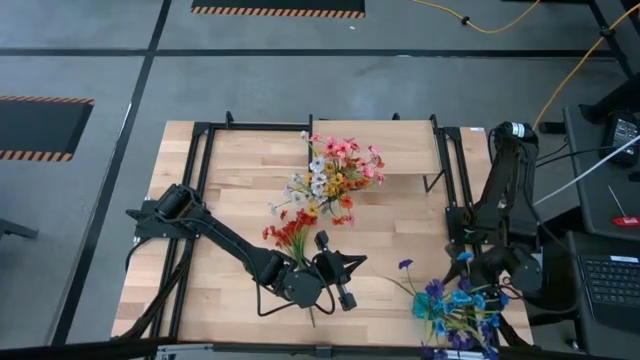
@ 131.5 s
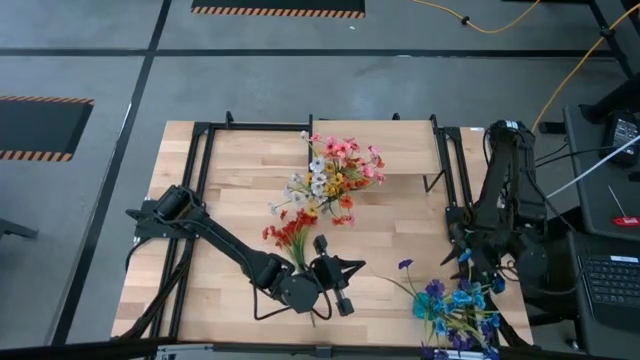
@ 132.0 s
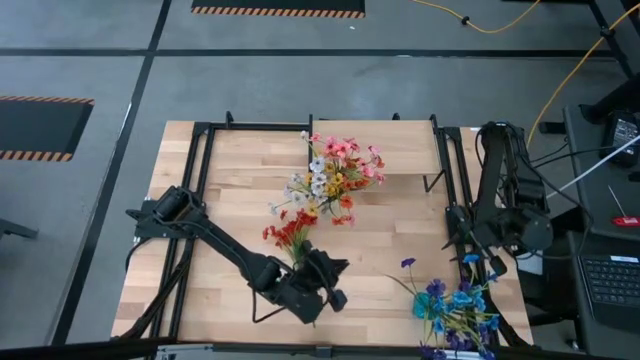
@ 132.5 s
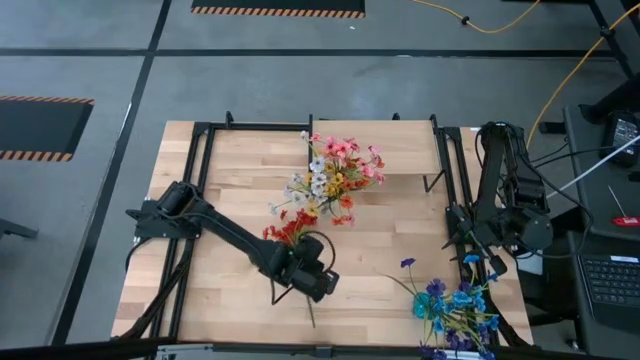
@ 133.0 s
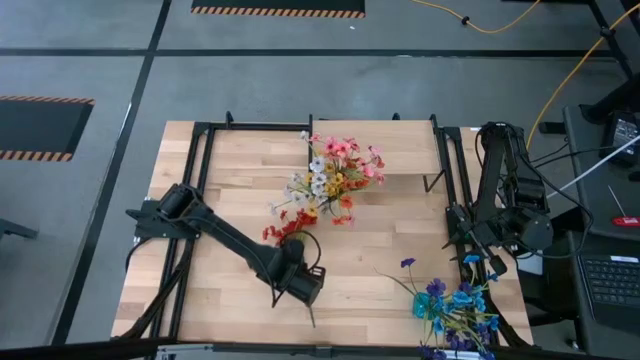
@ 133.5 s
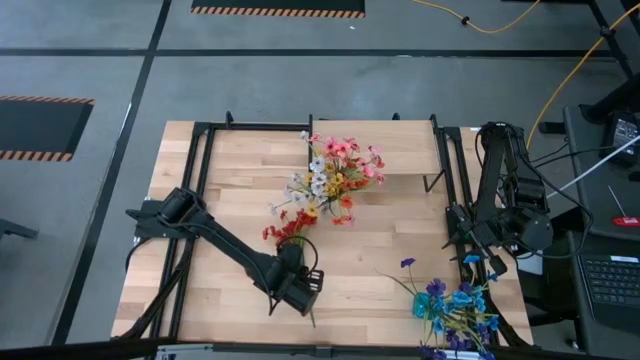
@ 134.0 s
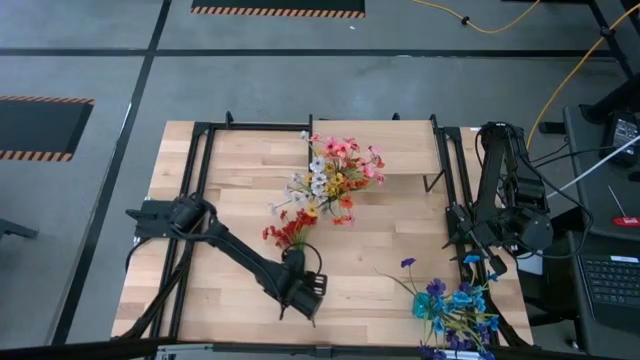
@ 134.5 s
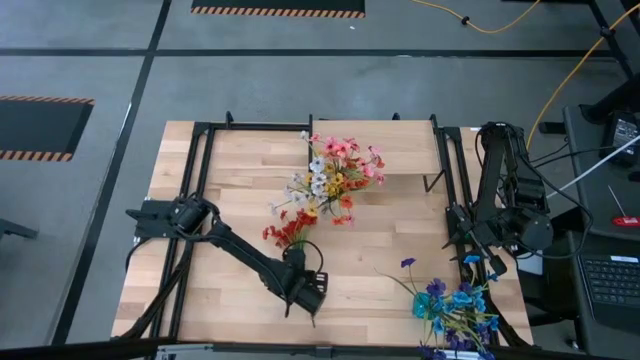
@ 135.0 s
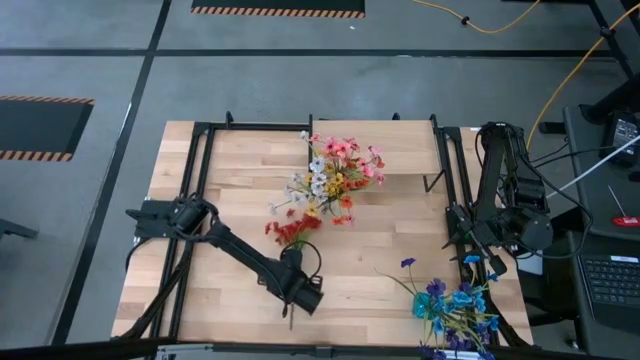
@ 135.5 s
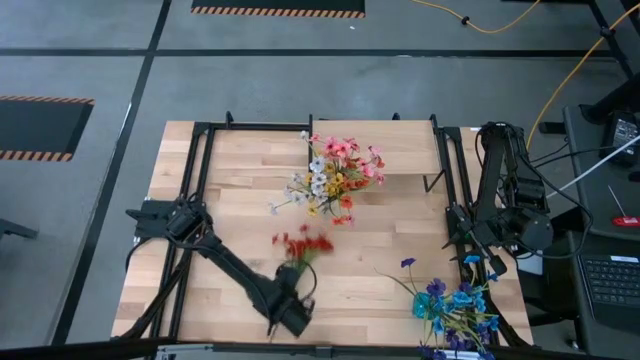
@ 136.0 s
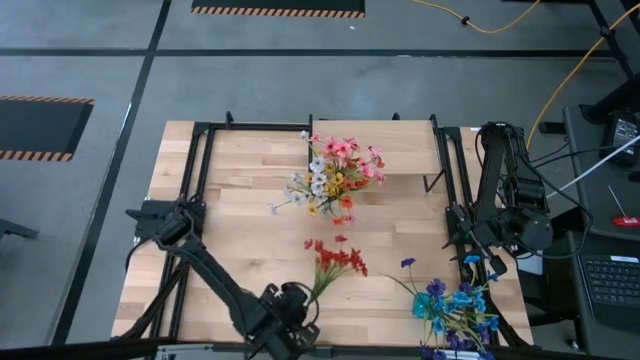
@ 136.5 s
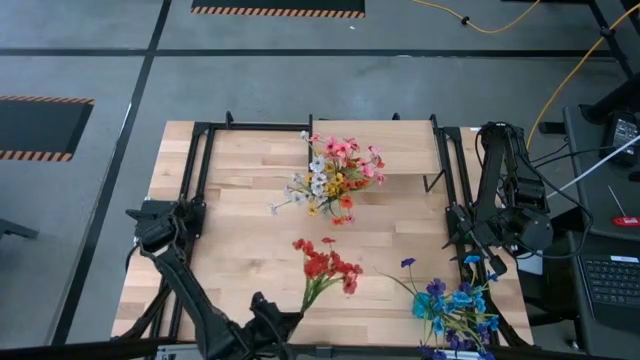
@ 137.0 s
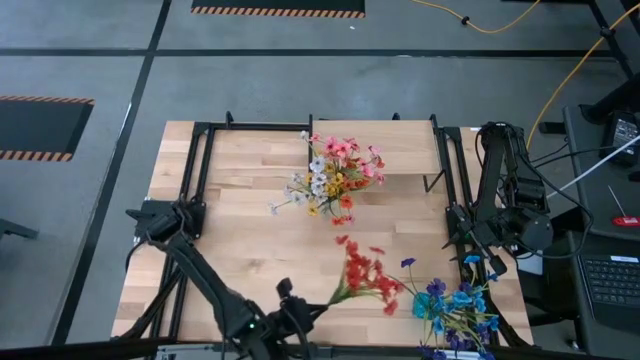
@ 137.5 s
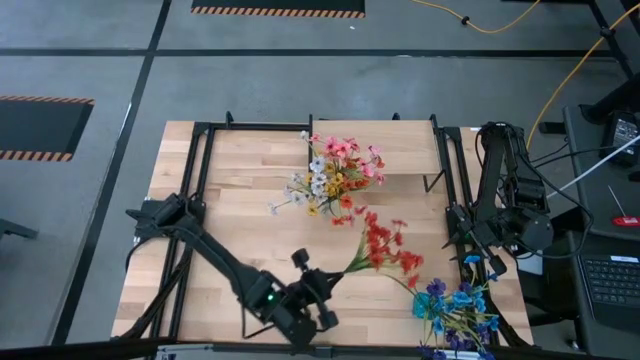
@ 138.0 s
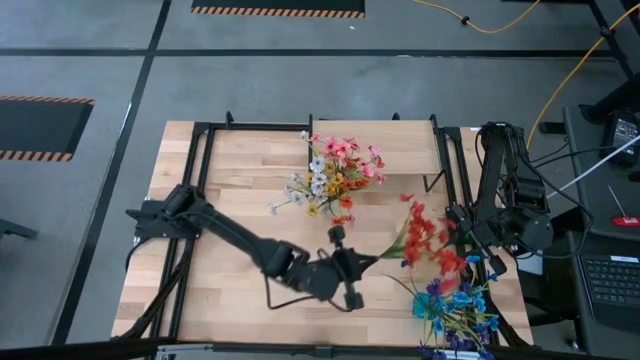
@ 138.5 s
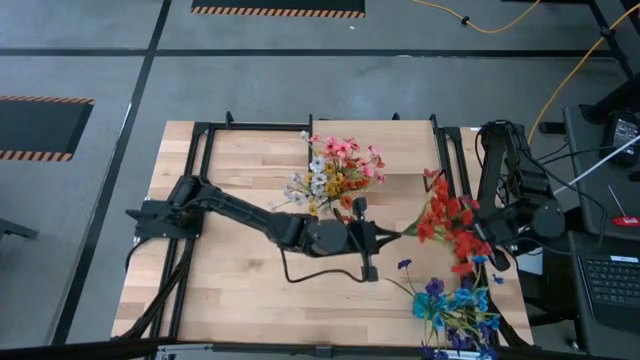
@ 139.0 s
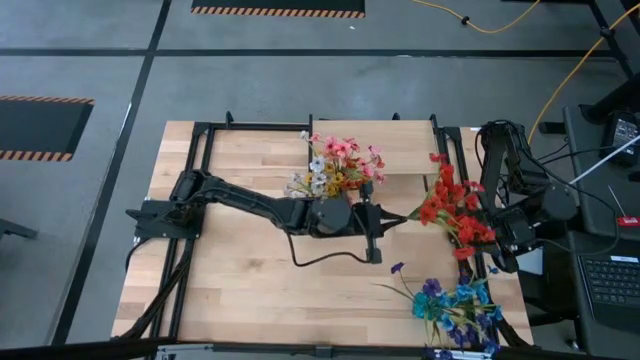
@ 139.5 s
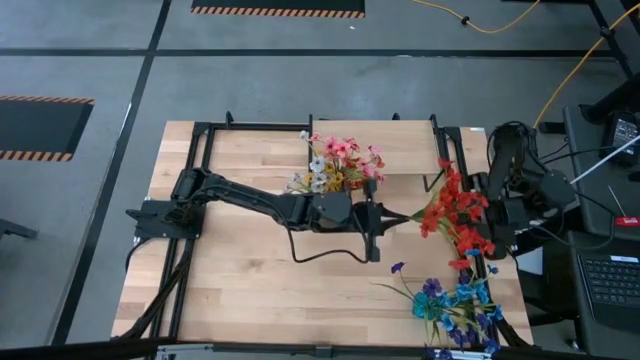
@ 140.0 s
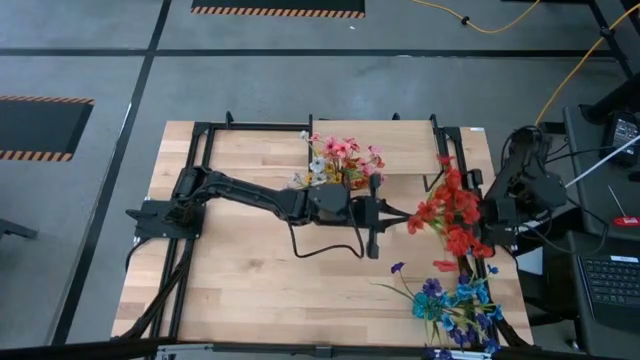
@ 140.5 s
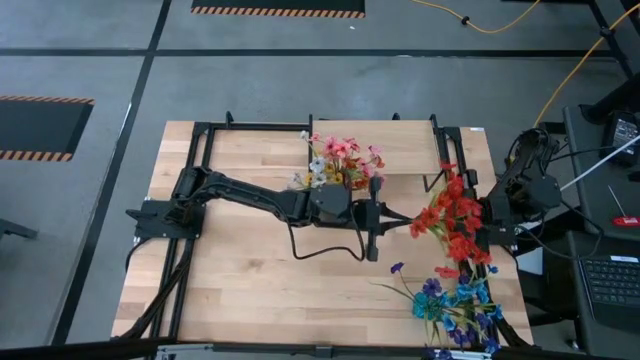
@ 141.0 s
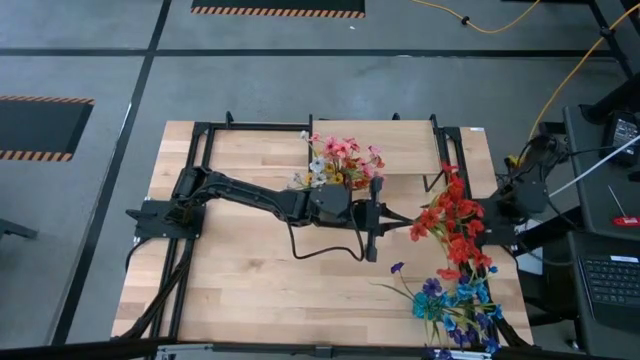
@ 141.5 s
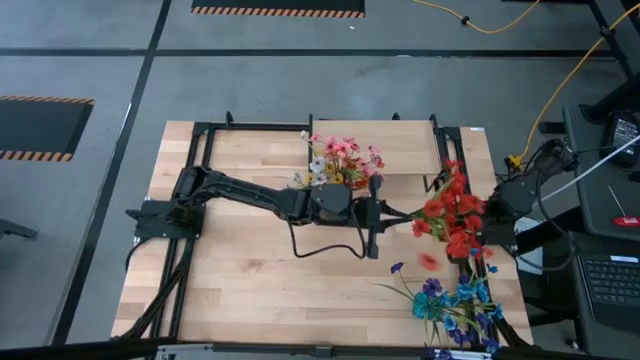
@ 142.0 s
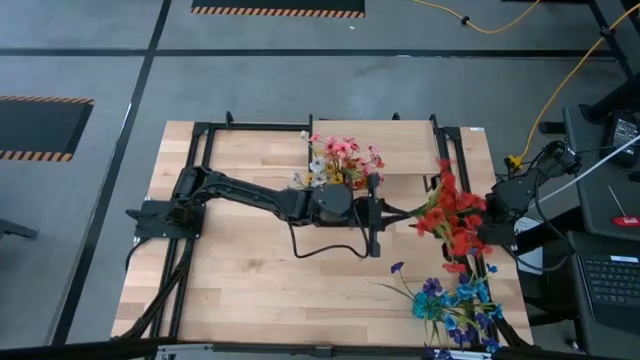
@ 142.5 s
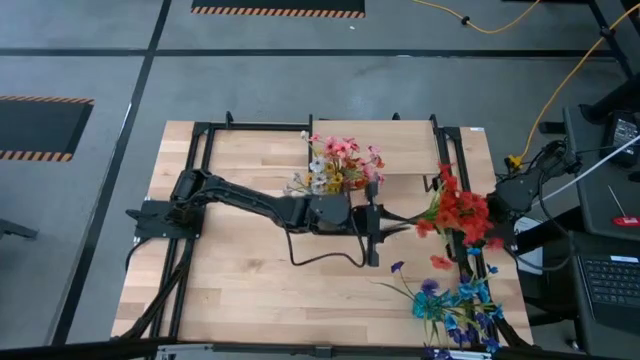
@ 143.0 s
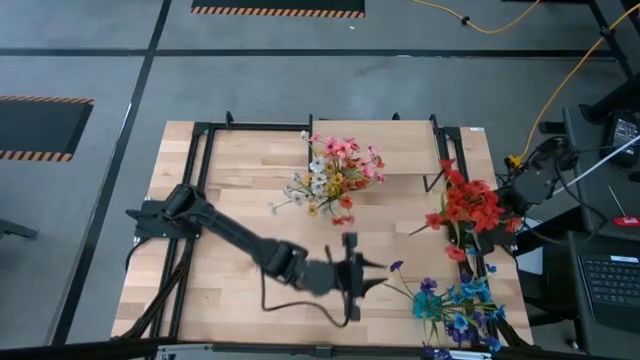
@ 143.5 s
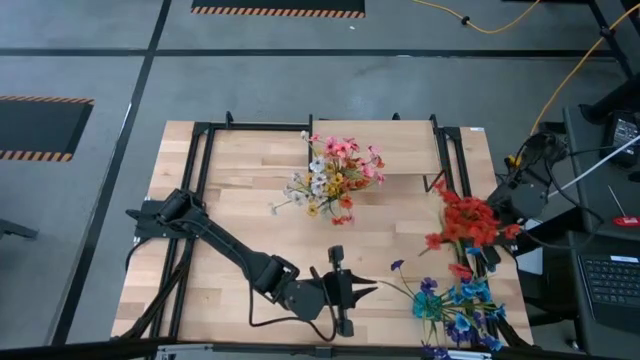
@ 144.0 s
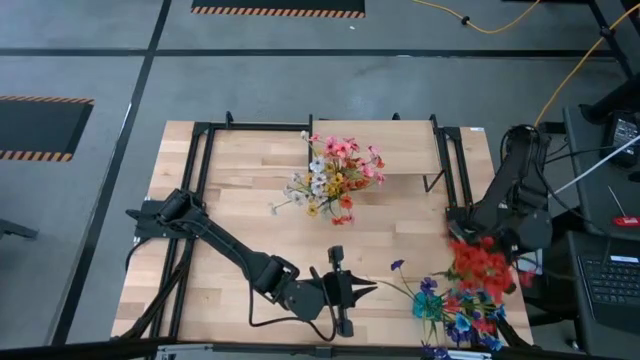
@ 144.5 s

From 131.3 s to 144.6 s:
Task: Pick and place flowers into a vace then onto a shelf
Put the red flowers into the blue vase

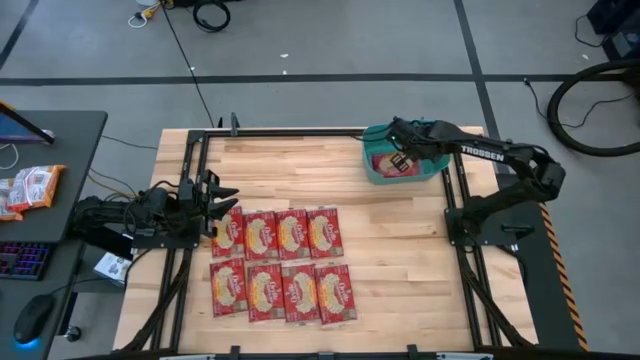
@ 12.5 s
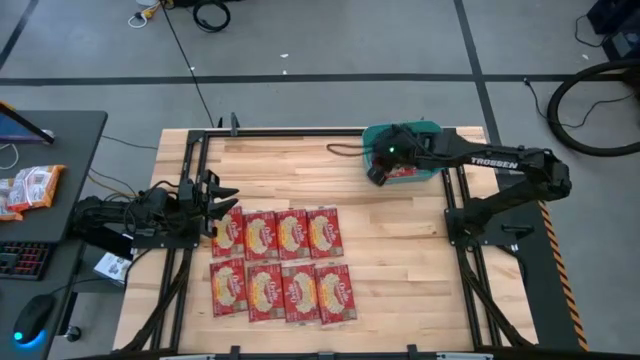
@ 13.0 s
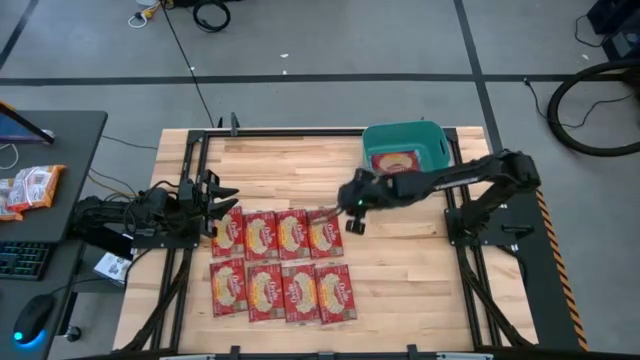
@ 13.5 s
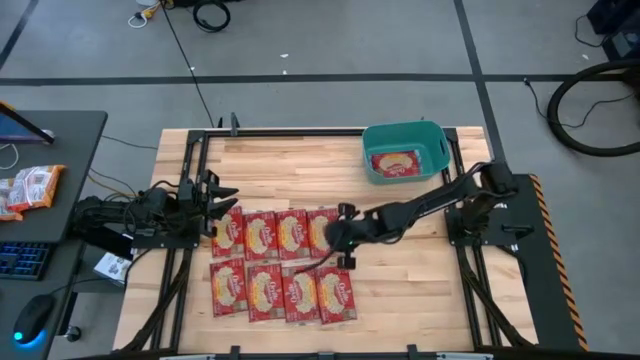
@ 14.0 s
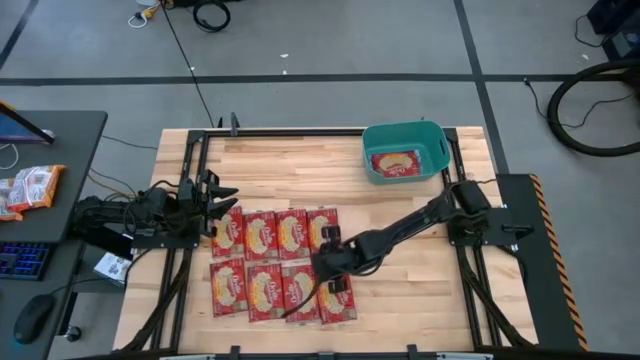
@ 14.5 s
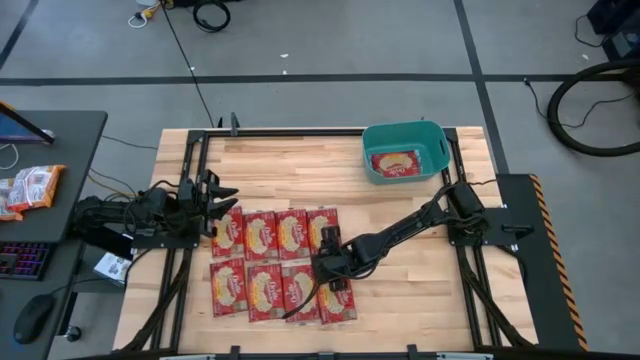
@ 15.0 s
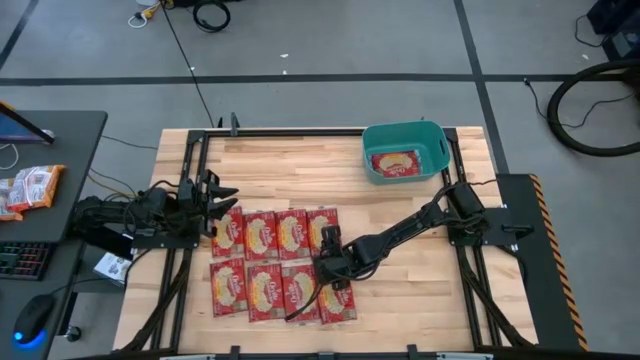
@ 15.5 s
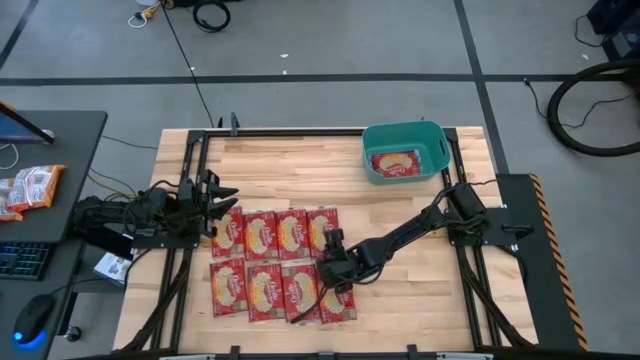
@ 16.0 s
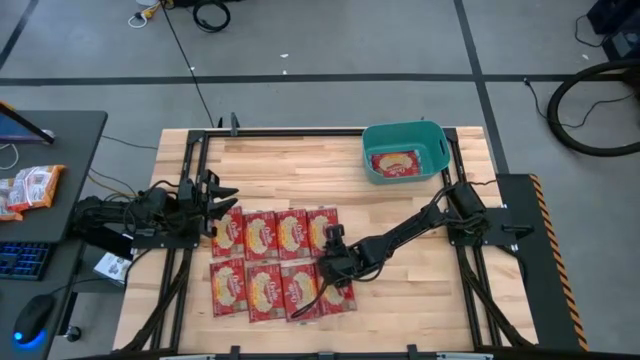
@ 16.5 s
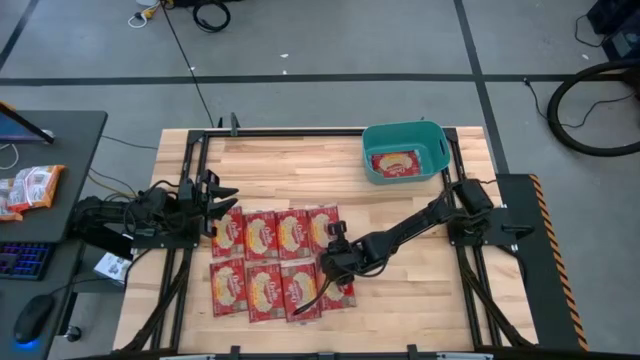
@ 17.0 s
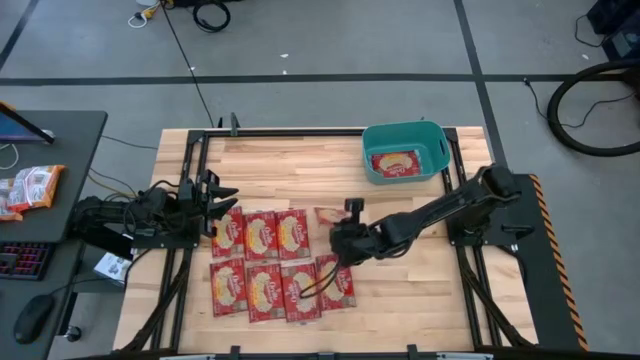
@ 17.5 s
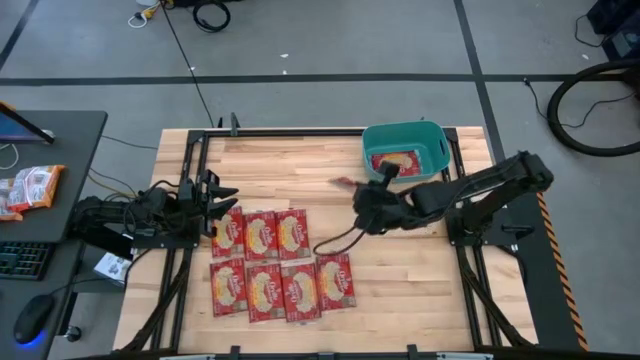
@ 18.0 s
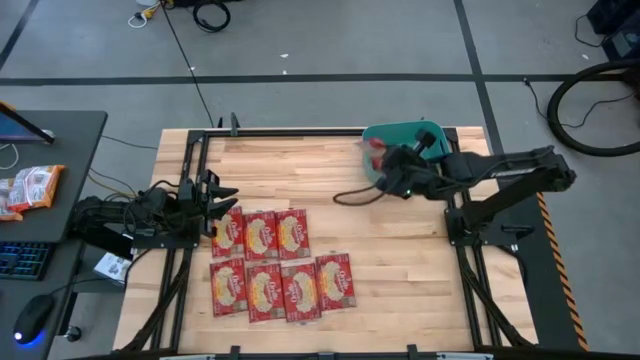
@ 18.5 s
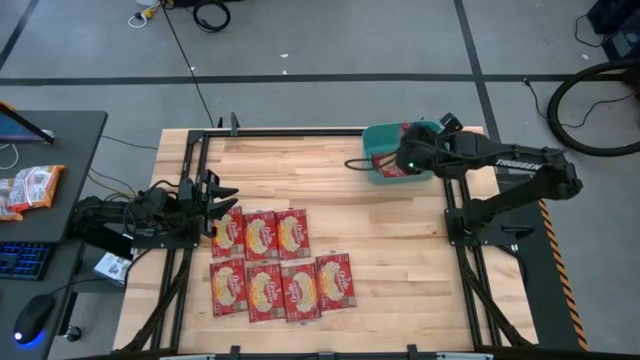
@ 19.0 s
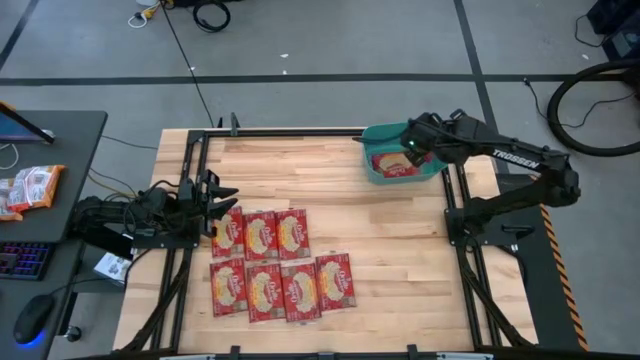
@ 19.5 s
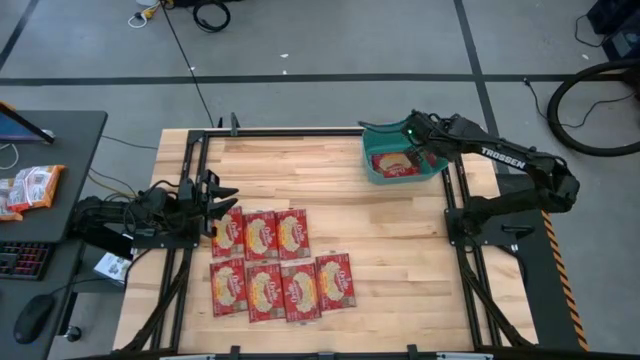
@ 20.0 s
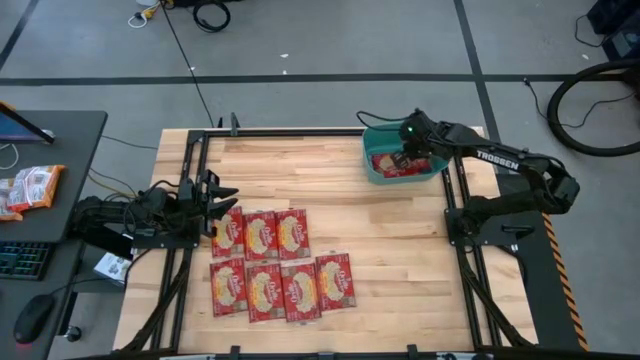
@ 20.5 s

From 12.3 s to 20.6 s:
Task: Sort popcorn bags into baskets
Put the red popcorn bag into the green bin
